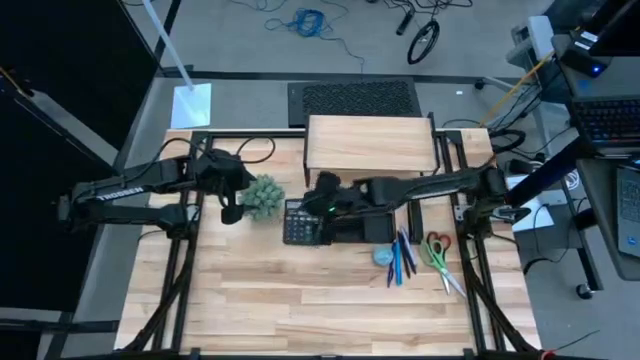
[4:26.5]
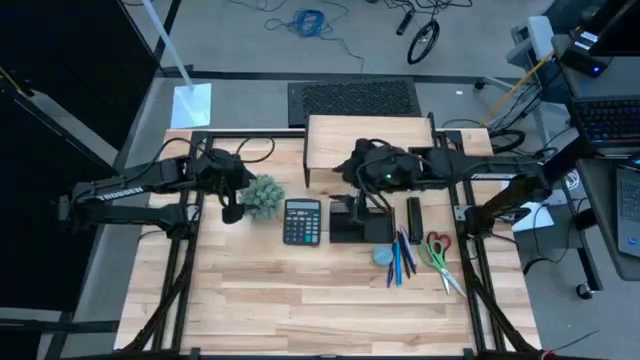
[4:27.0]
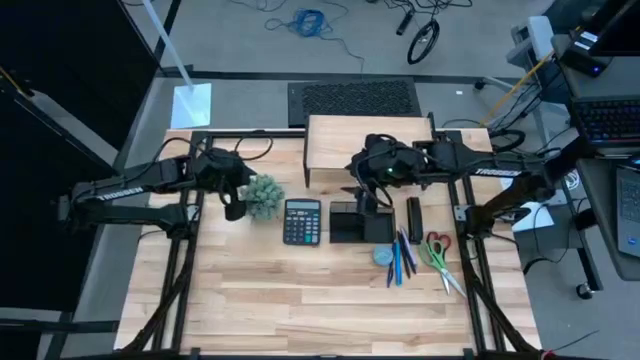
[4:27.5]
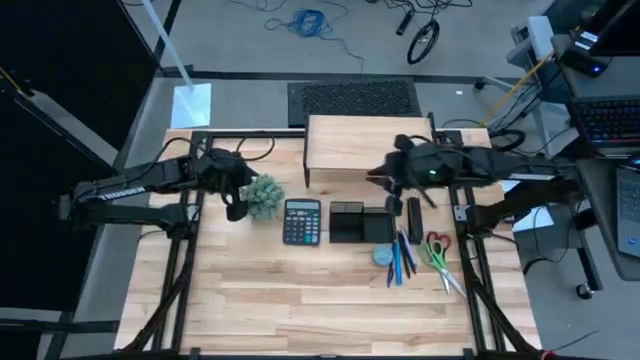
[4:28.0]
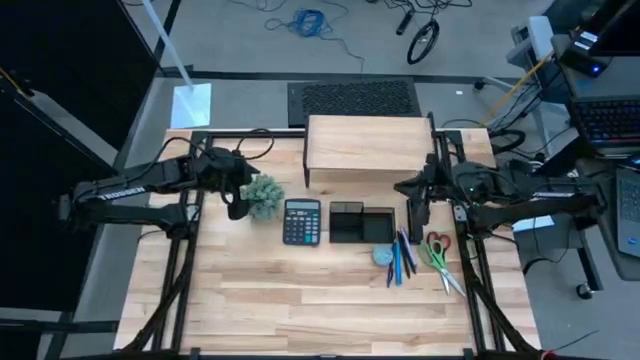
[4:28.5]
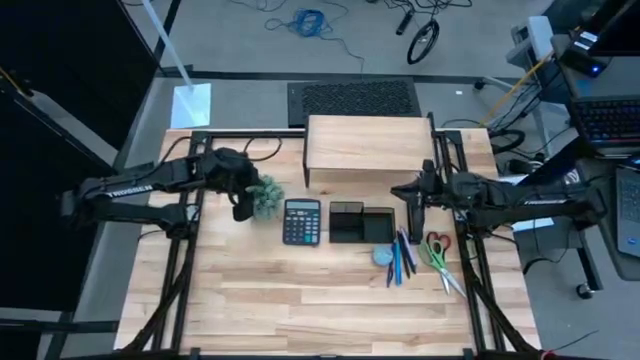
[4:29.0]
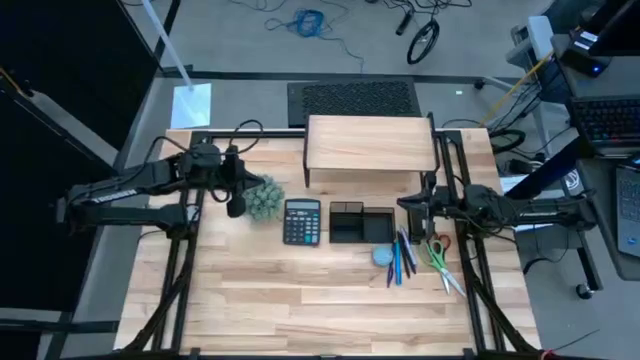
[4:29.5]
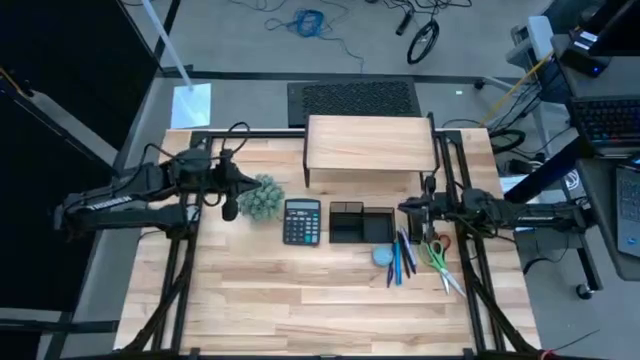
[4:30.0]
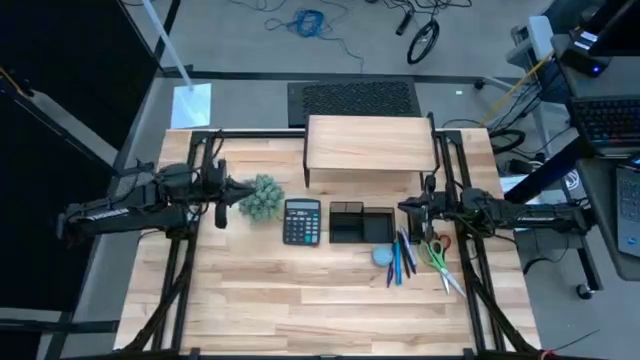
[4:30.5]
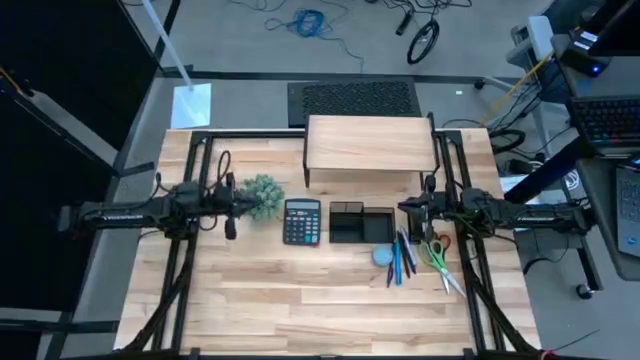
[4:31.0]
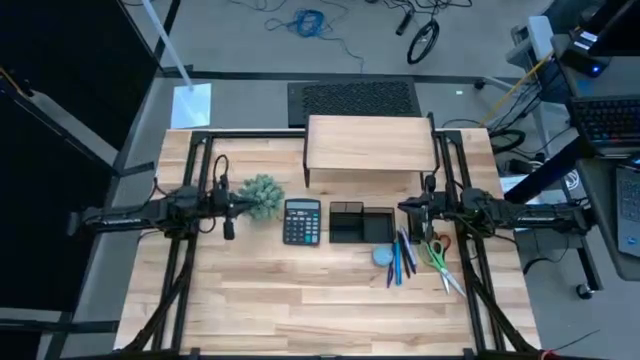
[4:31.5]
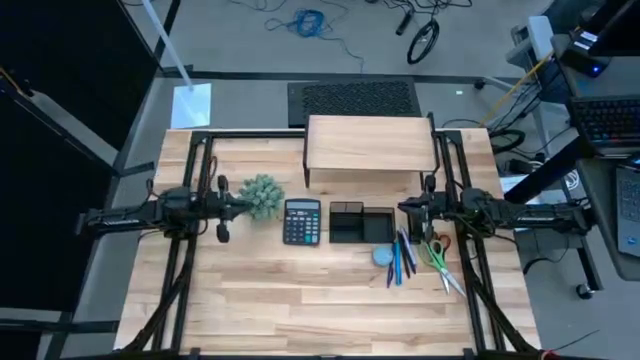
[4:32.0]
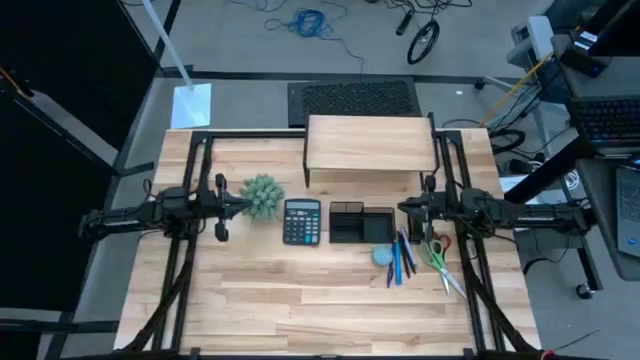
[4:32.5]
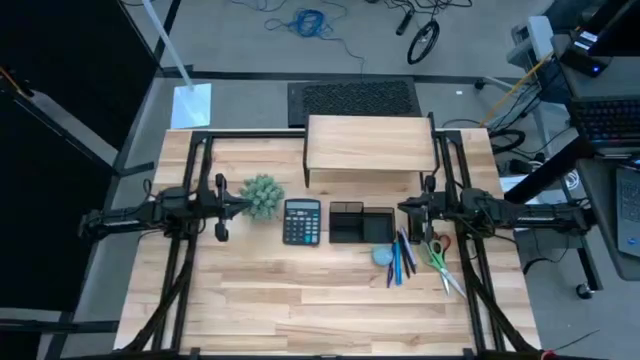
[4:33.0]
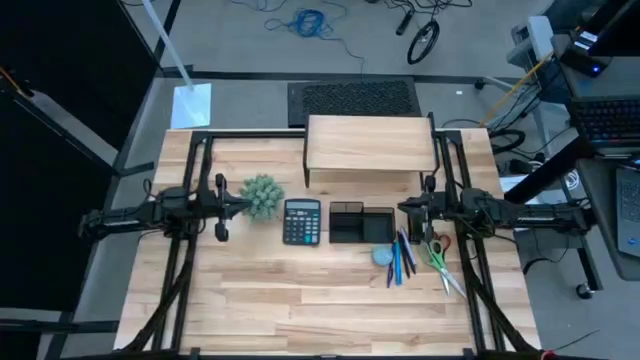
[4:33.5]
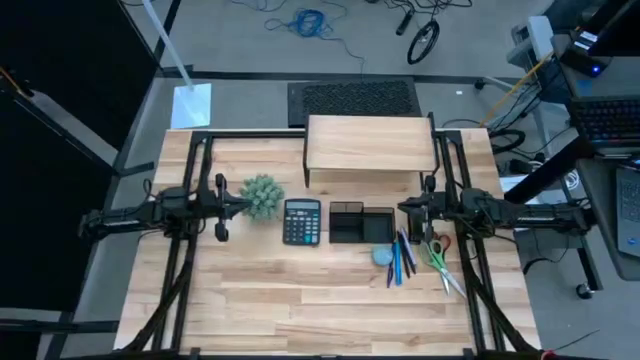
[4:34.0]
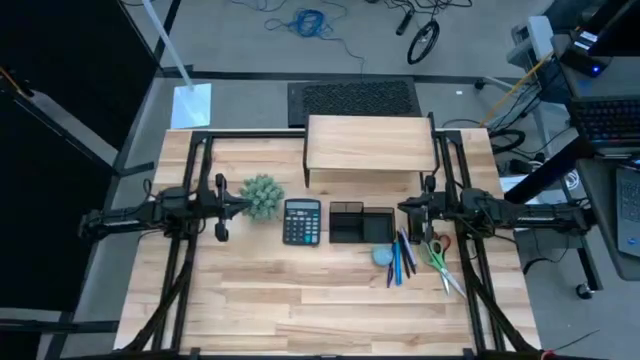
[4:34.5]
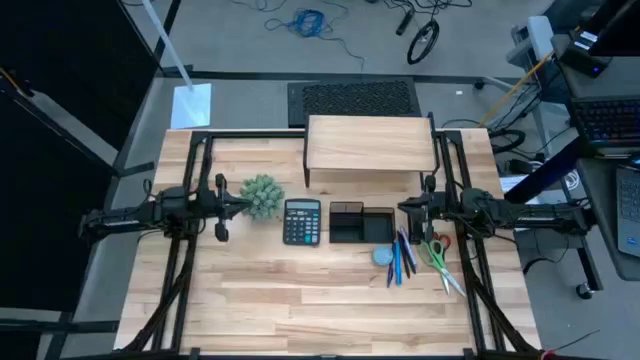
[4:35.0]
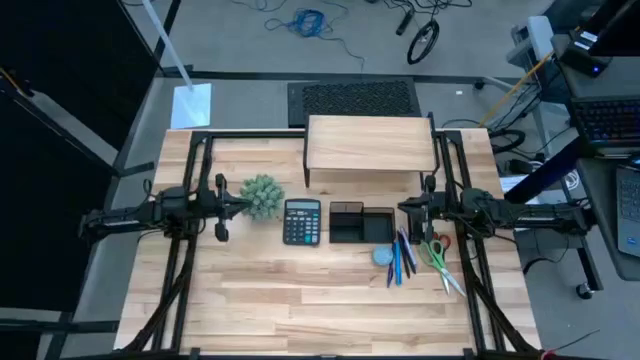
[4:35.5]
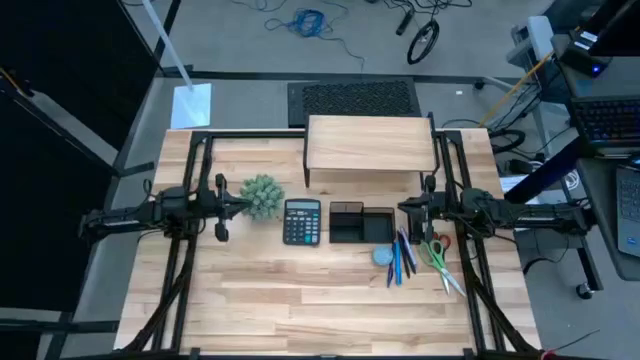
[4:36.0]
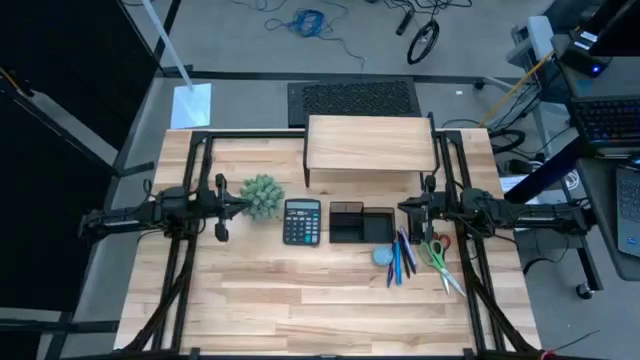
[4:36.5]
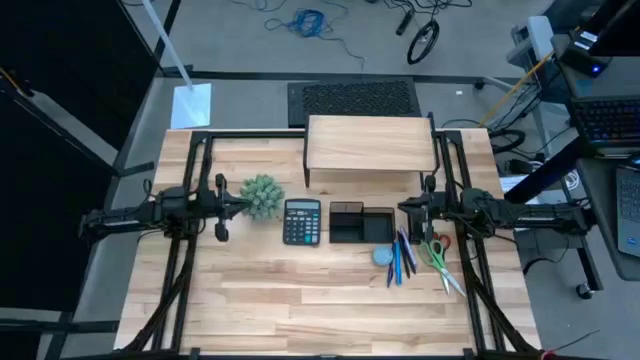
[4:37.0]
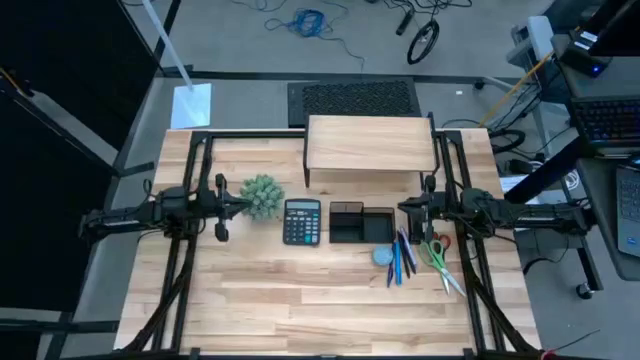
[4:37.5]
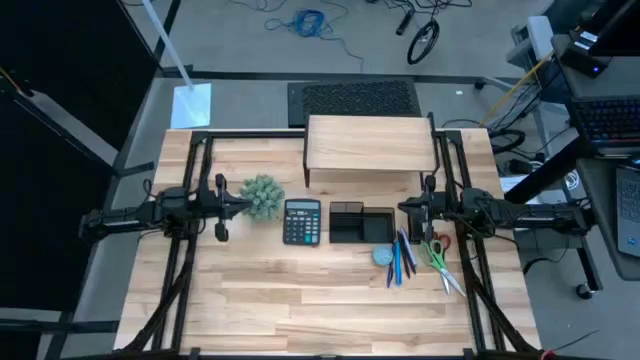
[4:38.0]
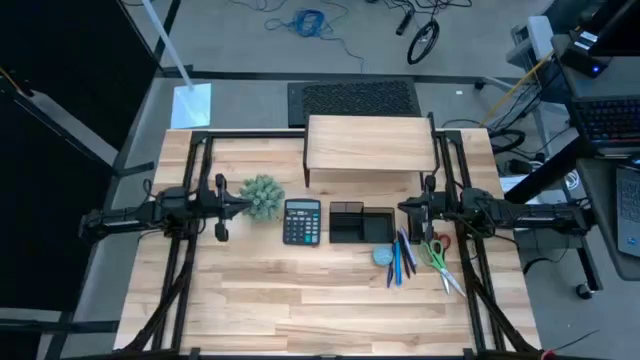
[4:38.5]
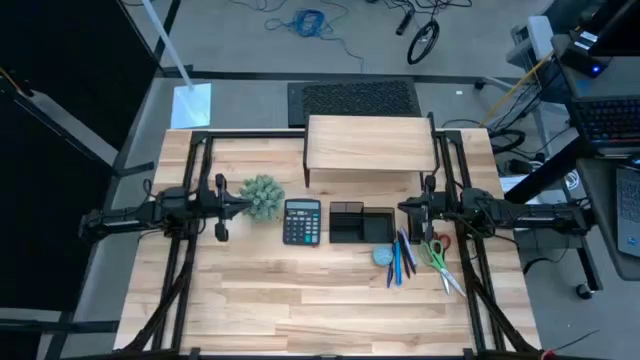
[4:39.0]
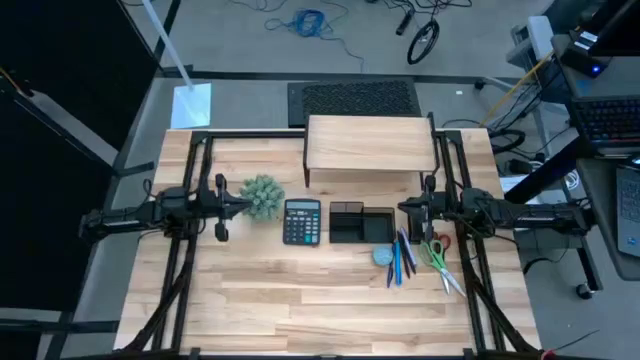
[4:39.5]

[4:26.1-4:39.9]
Task: Pick and place office supplies into organizer
Return to Home Position
